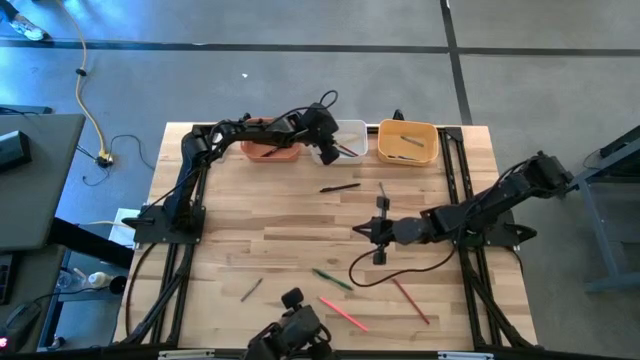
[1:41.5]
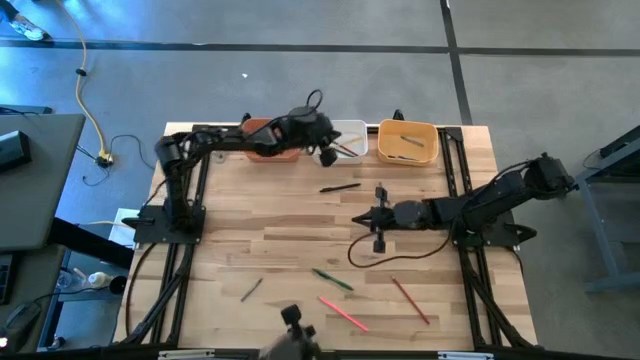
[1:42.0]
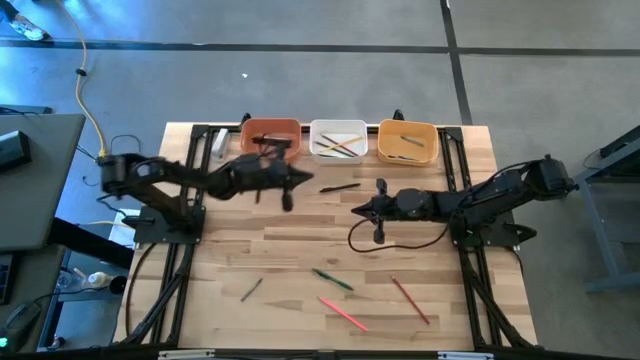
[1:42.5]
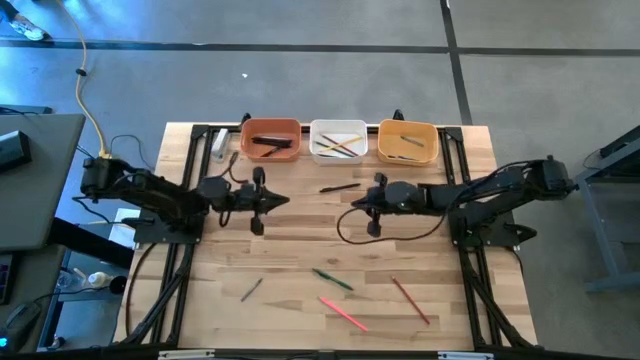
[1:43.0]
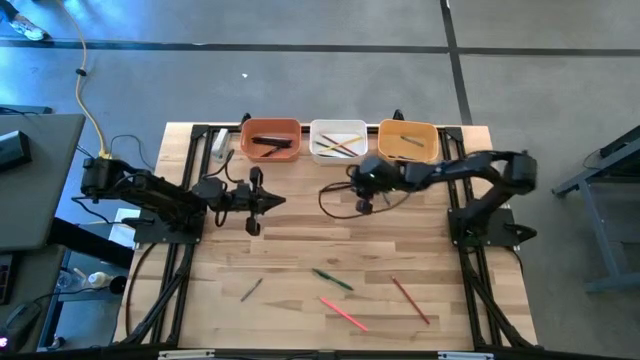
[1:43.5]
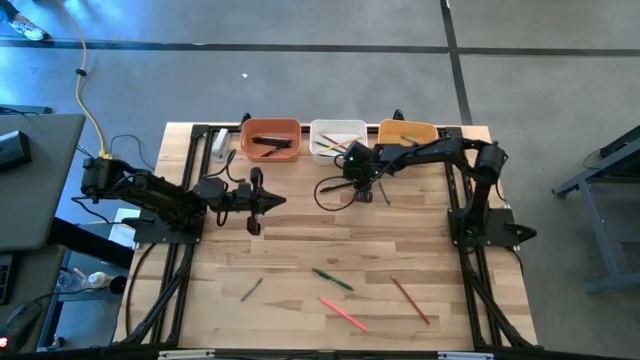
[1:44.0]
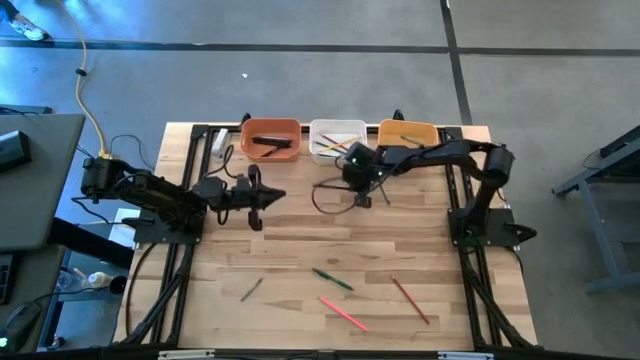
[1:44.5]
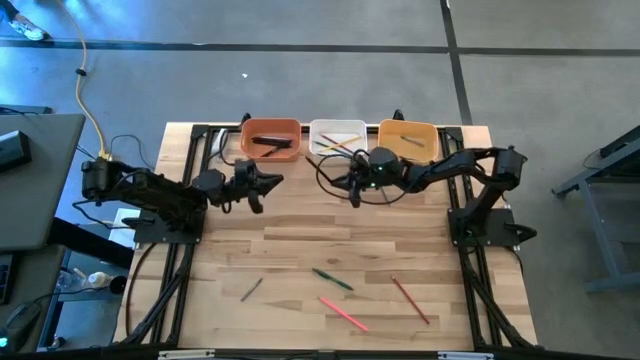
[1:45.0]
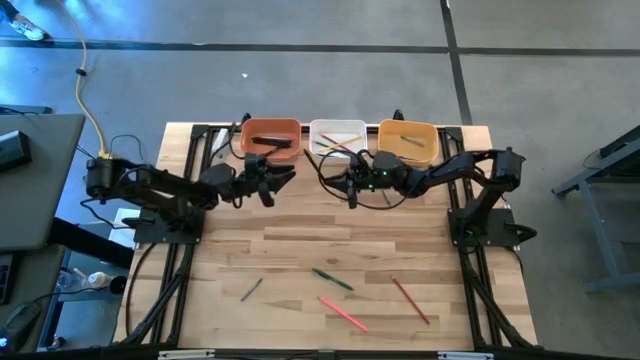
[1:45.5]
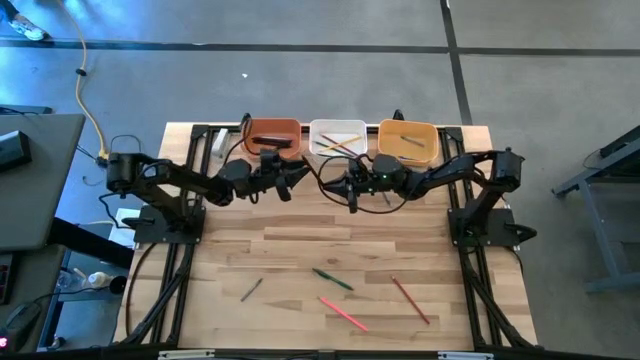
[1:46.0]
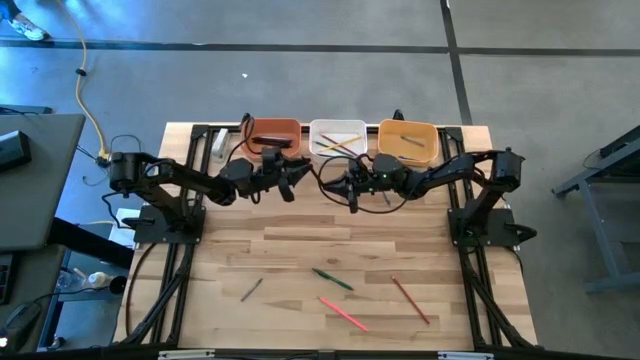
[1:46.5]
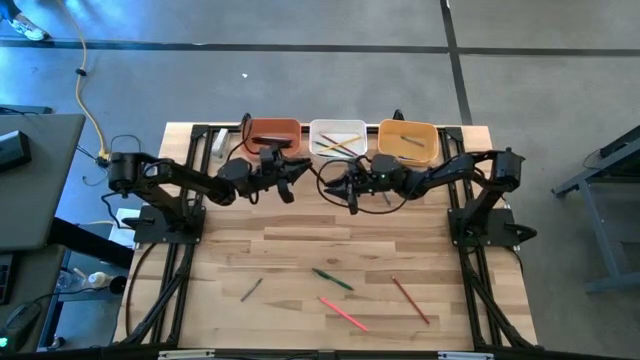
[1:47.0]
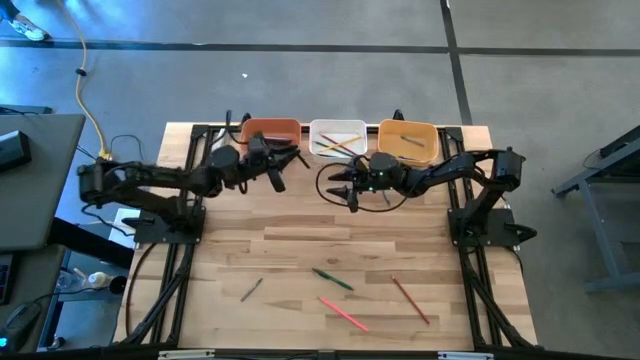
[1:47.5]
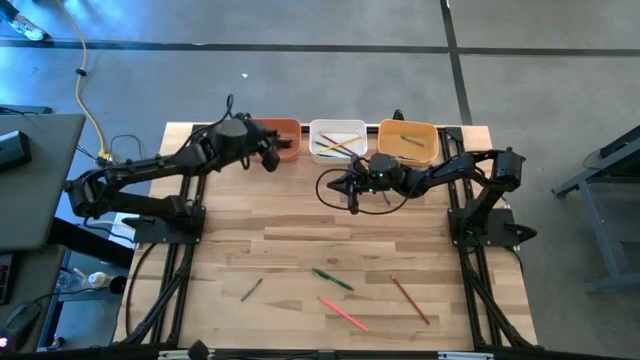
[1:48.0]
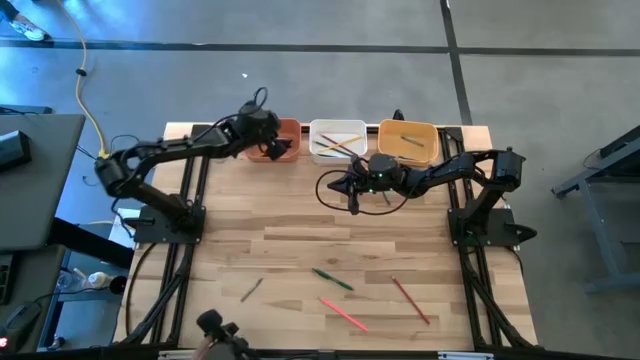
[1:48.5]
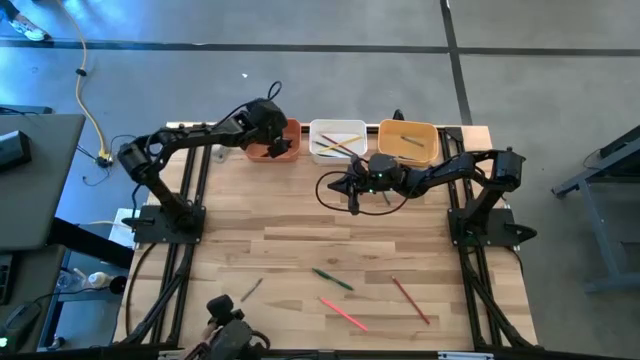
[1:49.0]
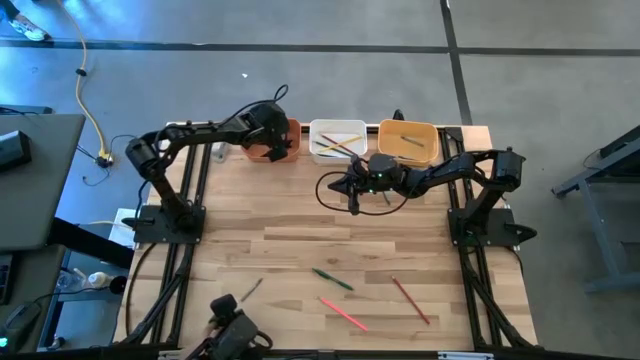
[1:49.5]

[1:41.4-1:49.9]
Task: Sort crayons/erasers/pens/pencils in bins
Put the black pen into the orange bin

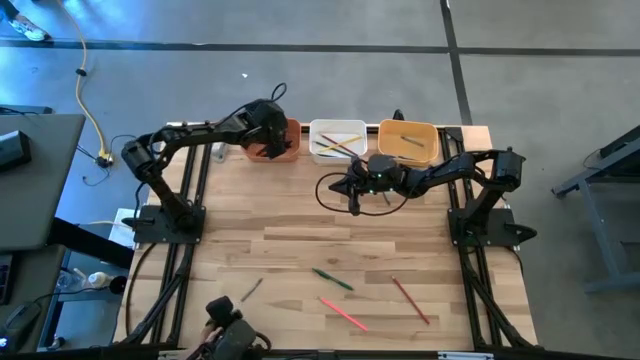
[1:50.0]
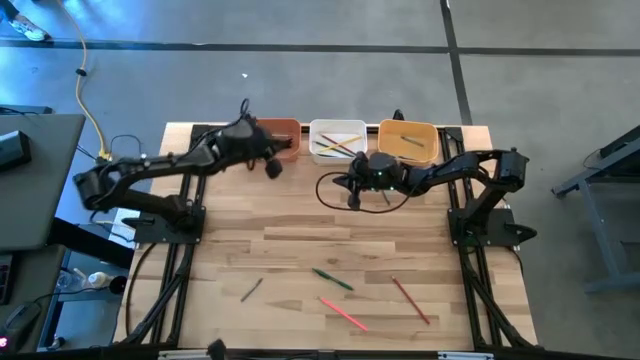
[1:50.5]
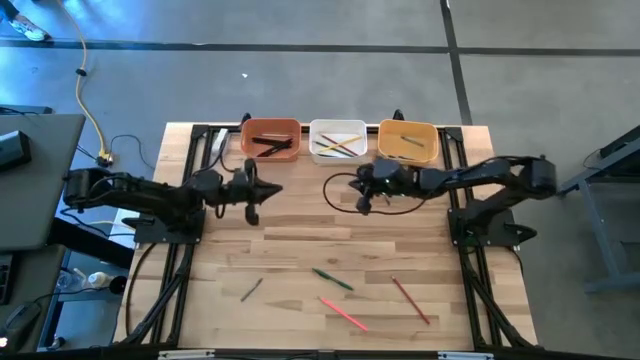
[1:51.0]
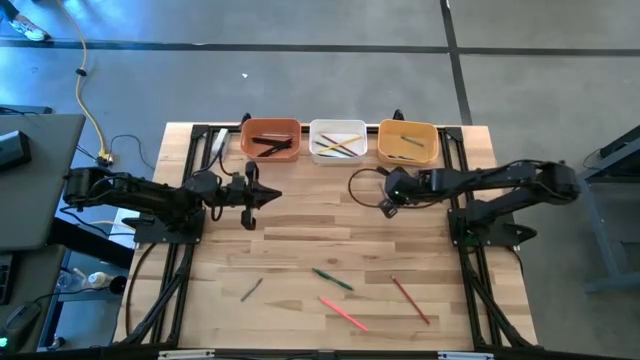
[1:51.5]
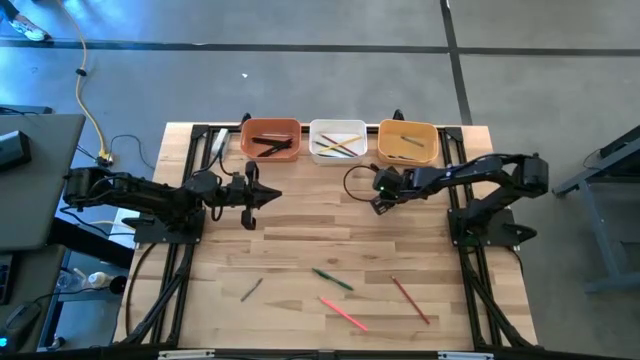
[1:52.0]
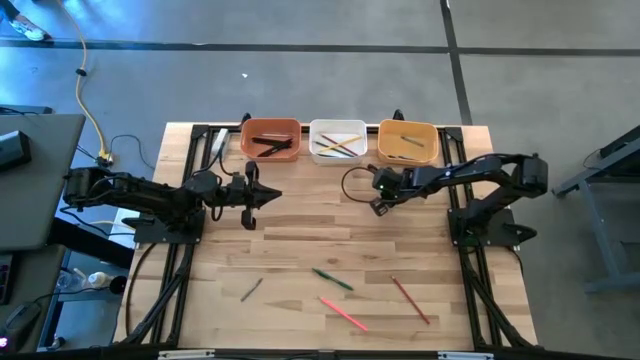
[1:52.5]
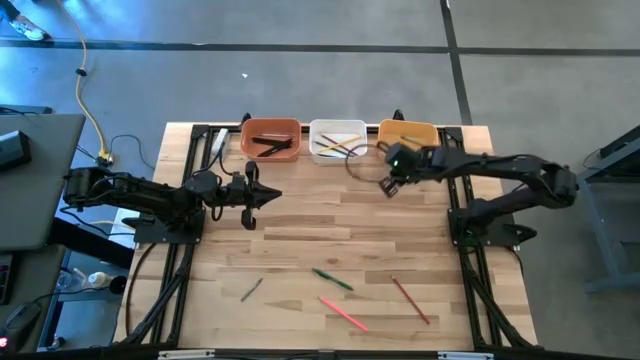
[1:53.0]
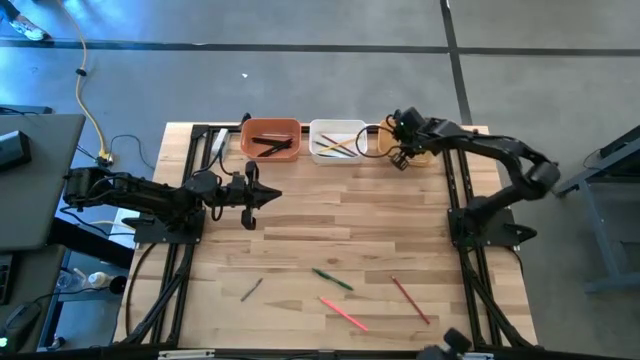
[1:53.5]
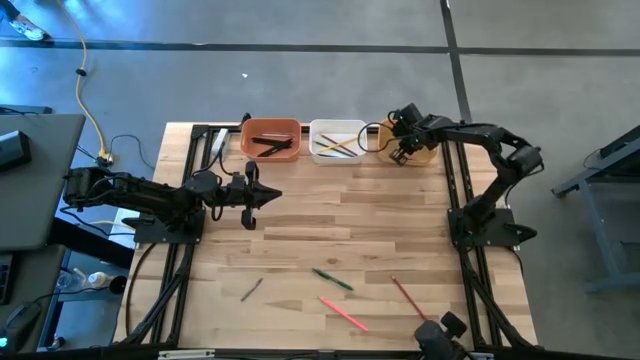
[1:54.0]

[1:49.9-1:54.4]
Put the top gray crayon into the yellow bin

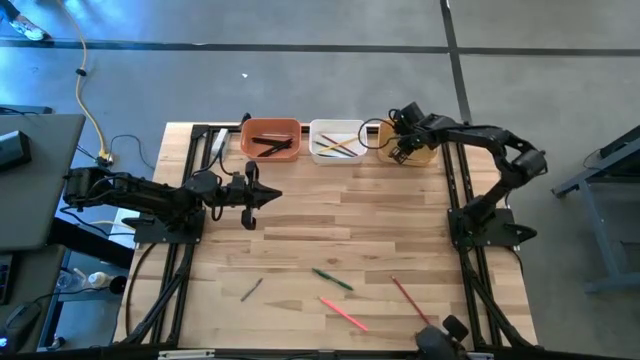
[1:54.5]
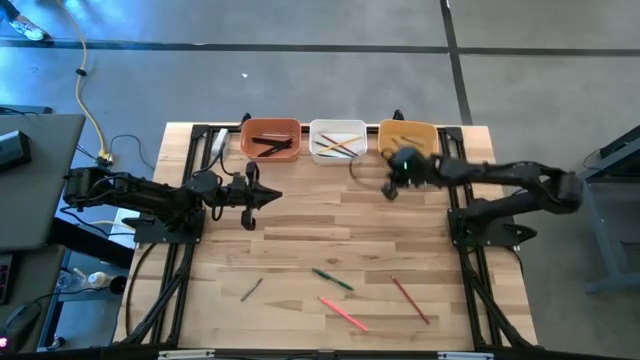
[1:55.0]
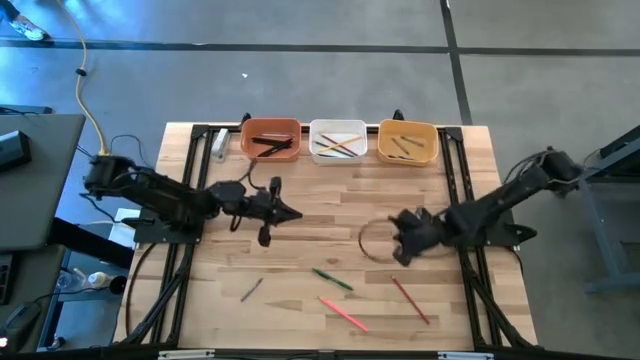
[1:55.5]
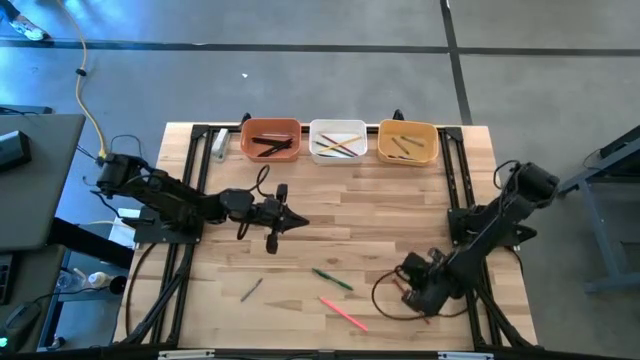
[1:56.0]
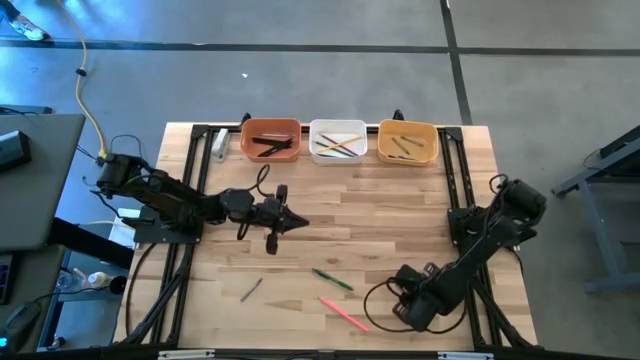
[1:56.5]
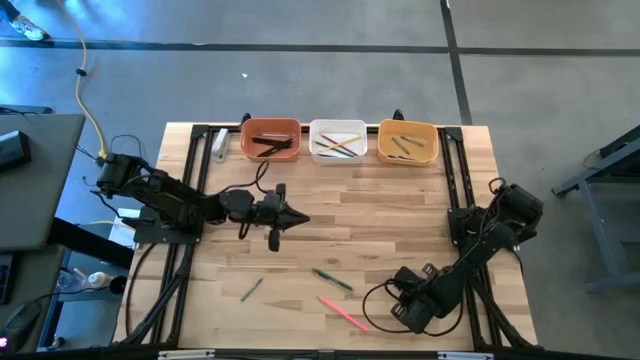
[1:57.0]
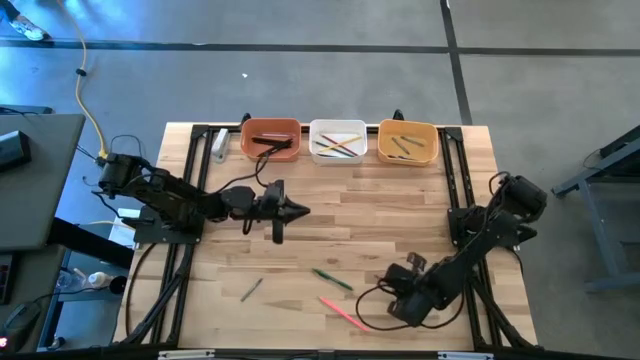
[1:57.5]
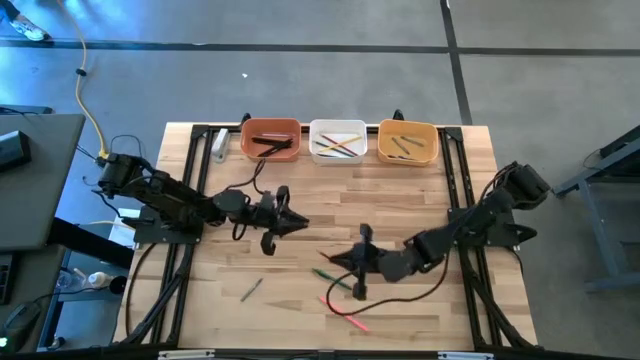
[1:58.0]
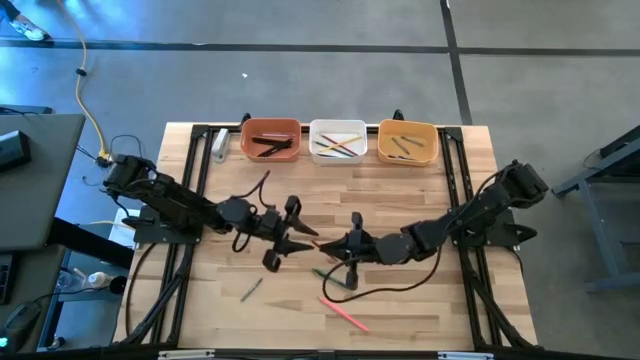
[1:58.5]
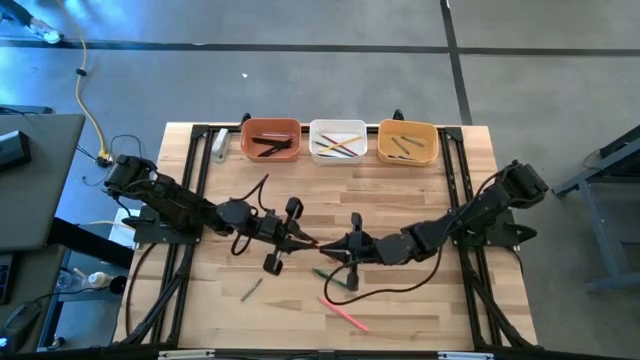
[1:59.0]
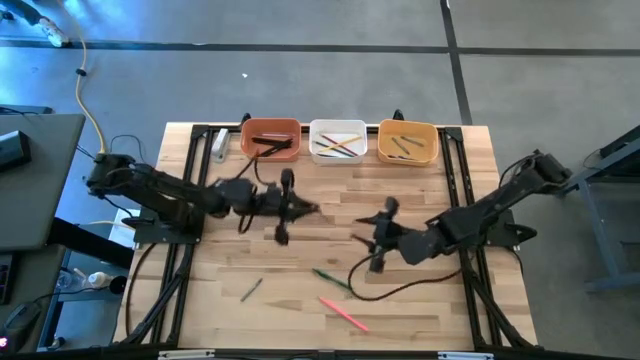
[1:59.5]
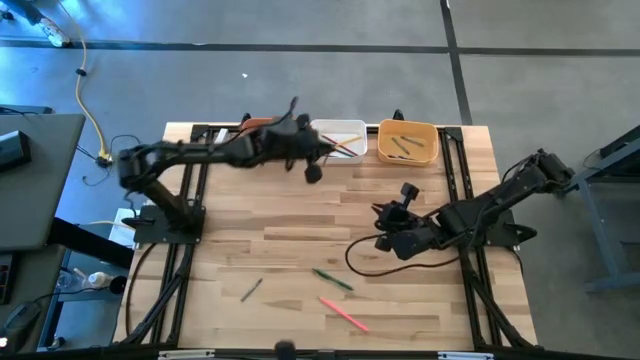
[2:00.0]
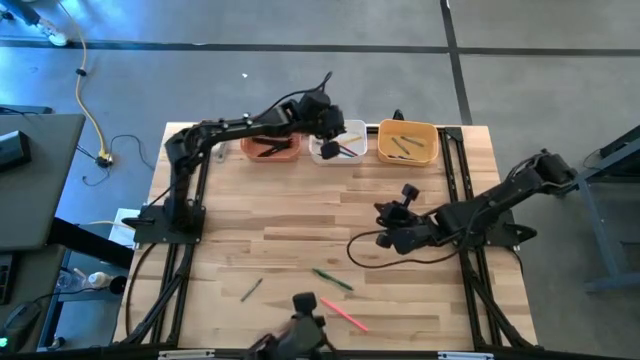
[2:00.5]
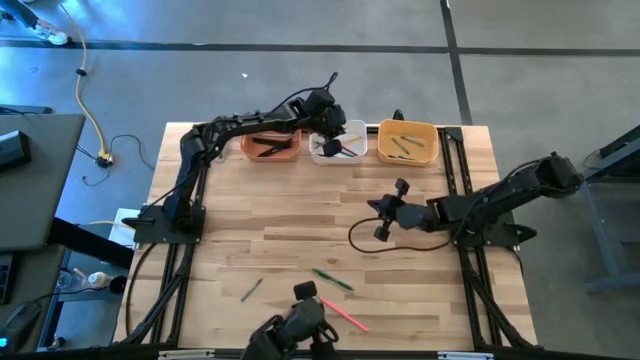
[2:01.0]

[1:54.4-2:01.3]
Put the red pencil into the white bin

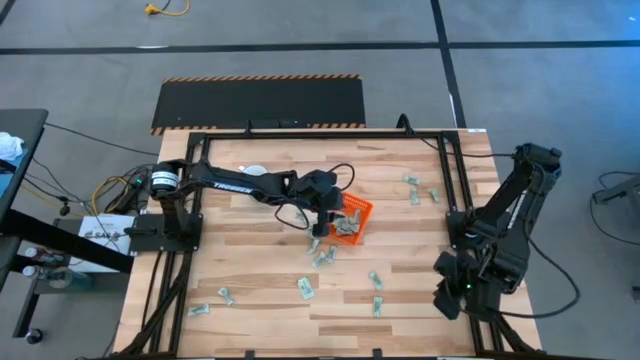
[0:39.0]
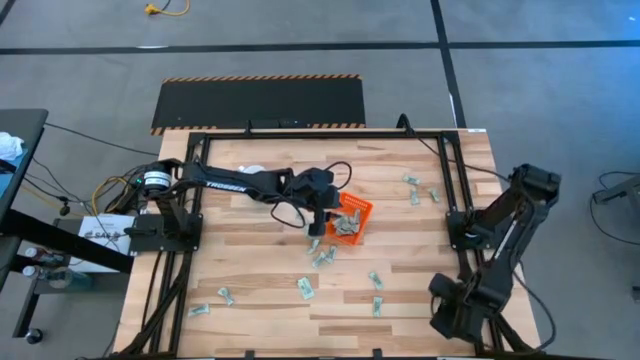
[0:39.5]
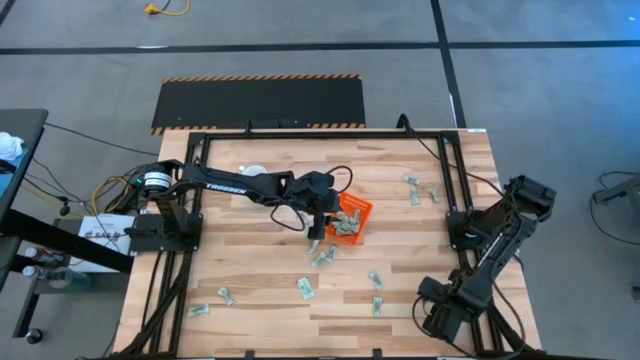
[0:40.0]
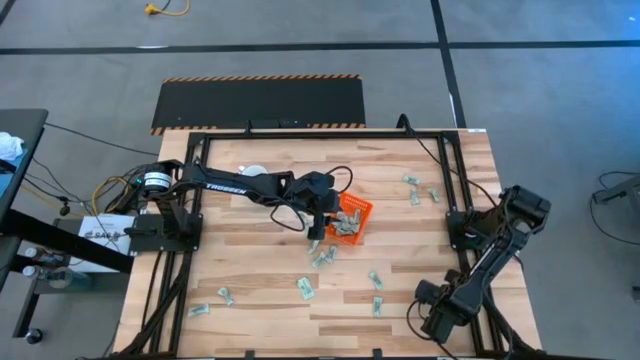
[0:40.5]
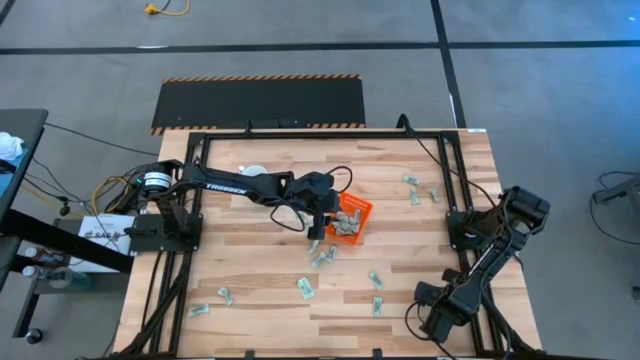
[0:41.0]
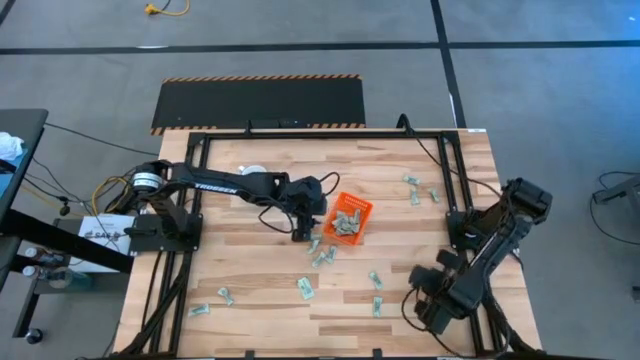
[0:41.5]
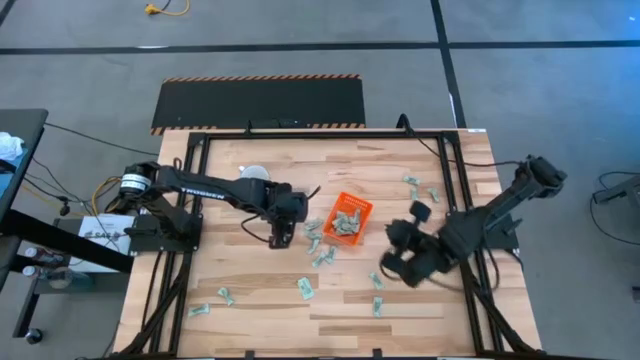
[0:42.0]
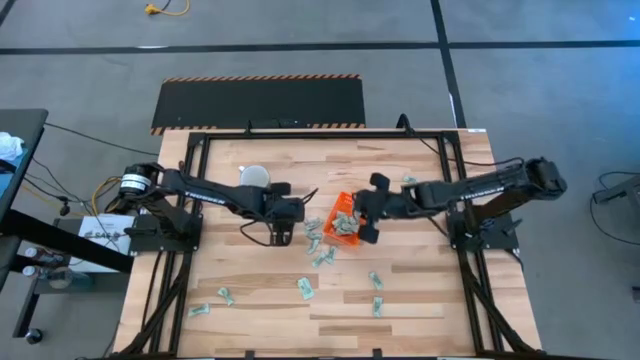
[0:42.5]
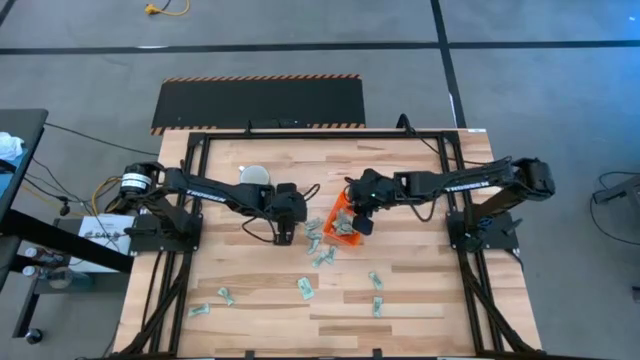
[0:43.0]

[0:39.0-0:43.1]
Task: Pick and place Stevia / Truvia into bins
Put the stevia packet into the basket
